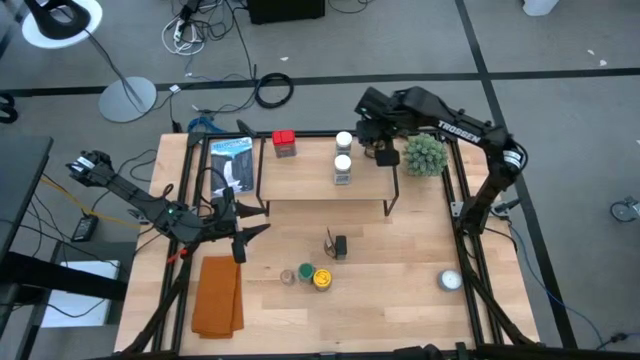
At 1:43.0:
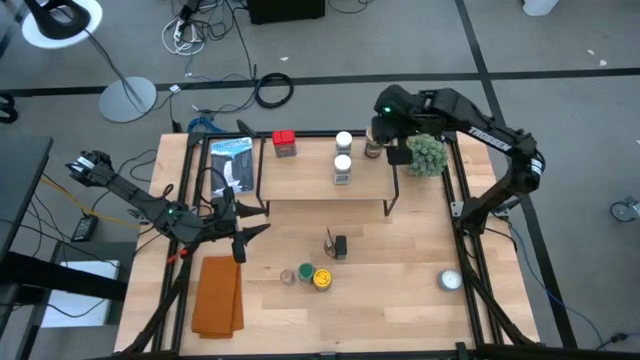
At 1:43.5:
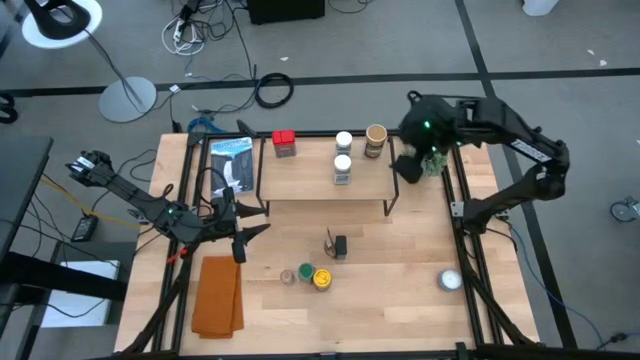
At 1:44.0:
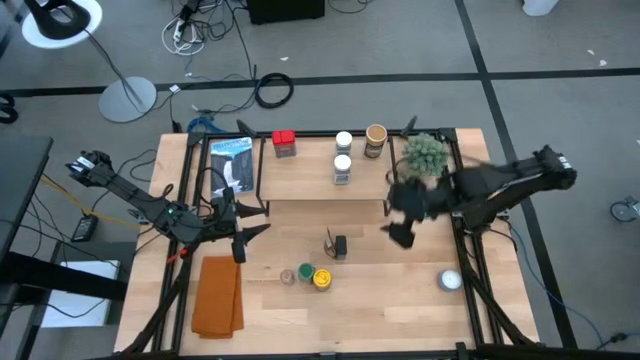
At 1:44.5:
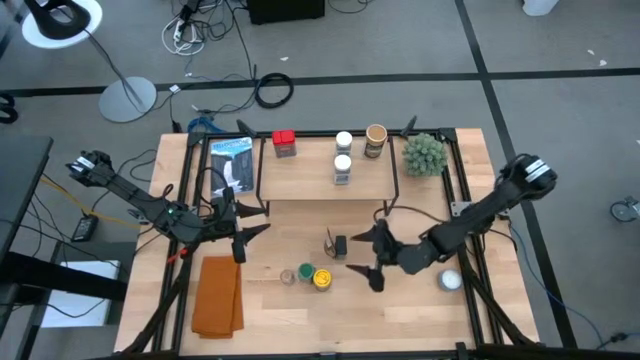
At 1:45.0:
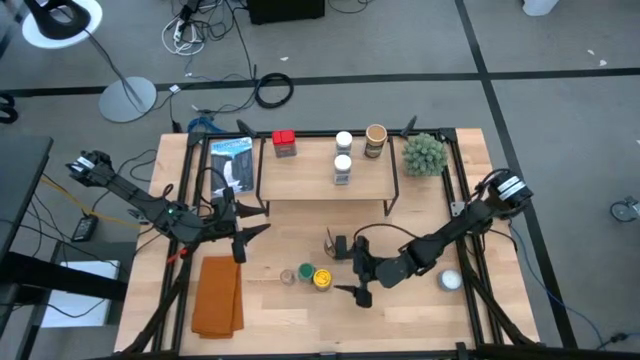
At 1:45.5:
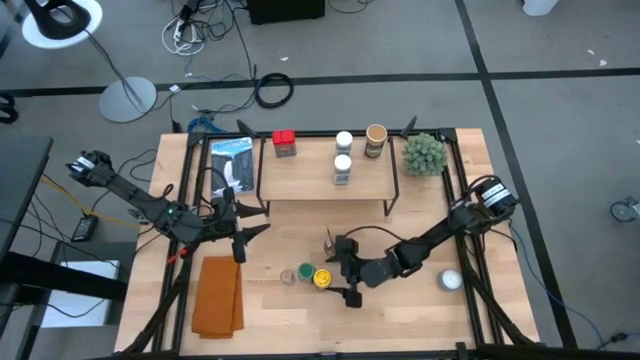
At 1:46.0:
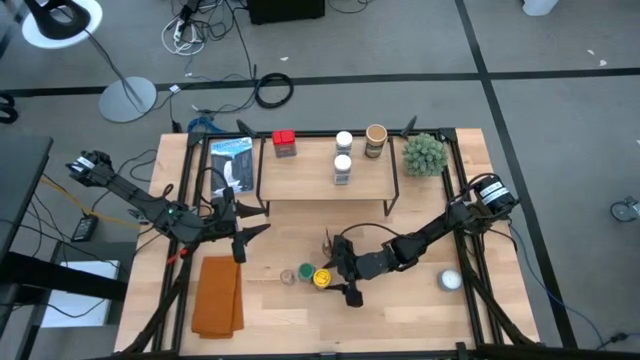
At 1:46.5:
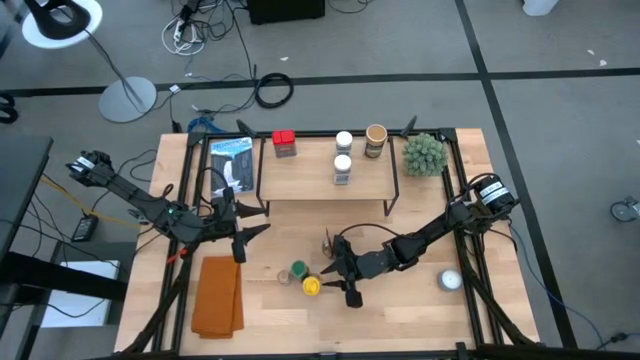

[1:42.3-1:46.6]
Task: Shelf spices
Put the yellow seasoning bottle on the shelf

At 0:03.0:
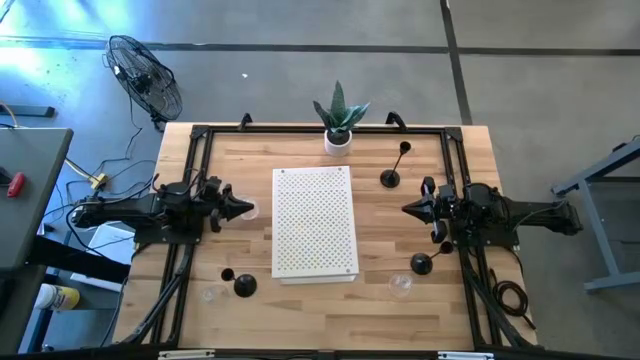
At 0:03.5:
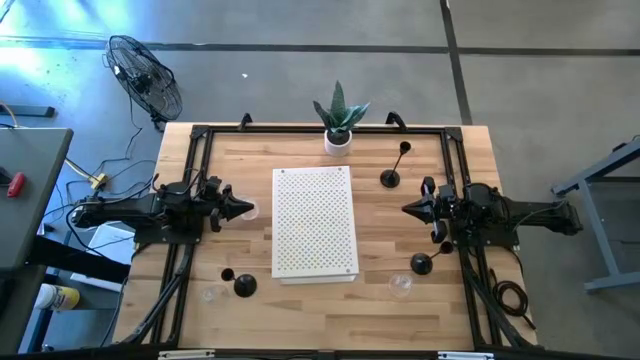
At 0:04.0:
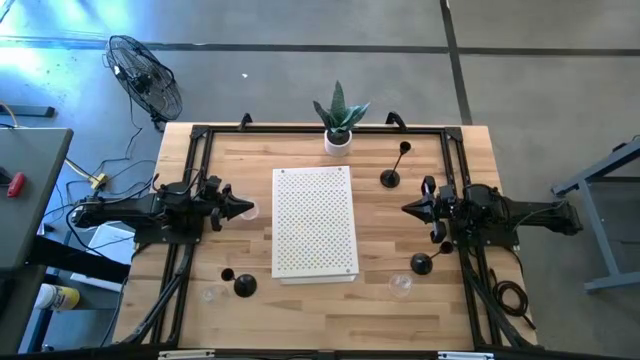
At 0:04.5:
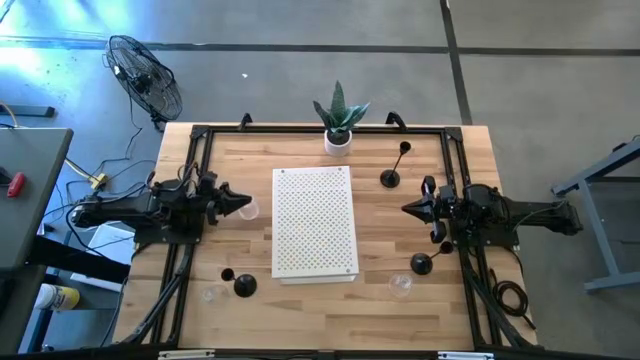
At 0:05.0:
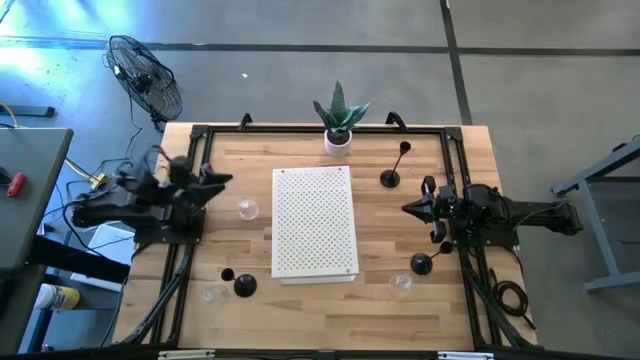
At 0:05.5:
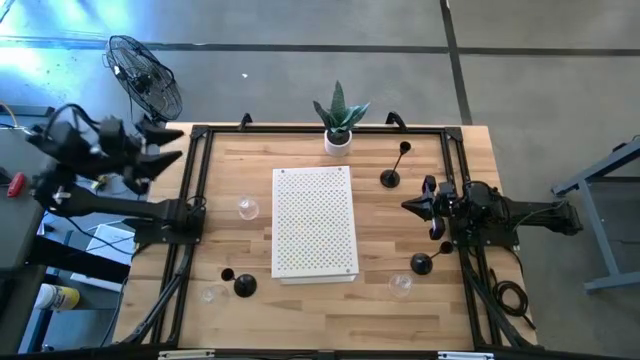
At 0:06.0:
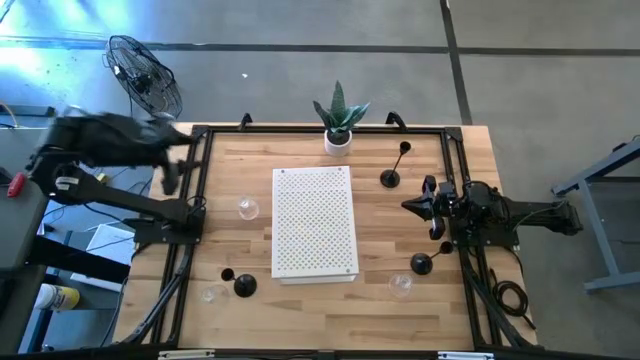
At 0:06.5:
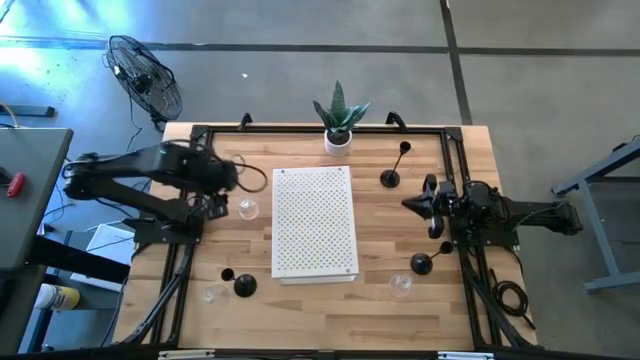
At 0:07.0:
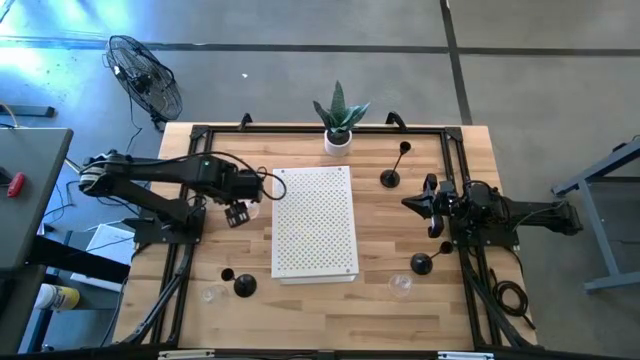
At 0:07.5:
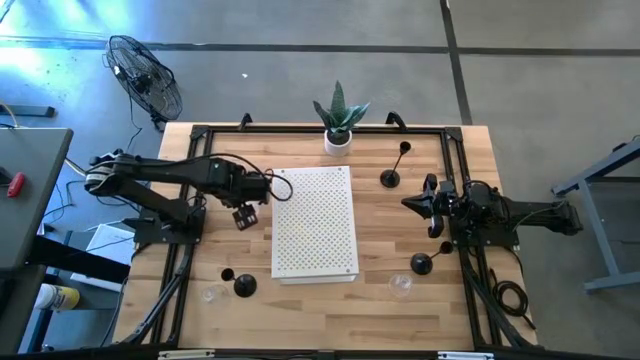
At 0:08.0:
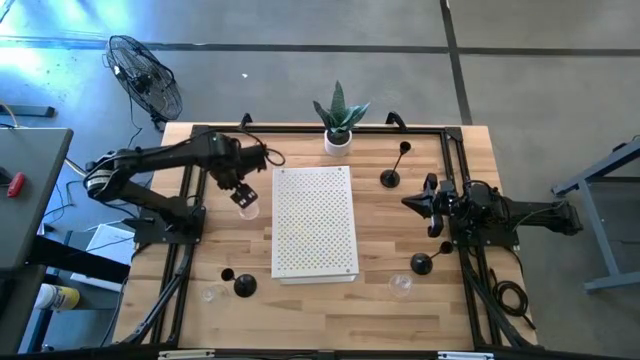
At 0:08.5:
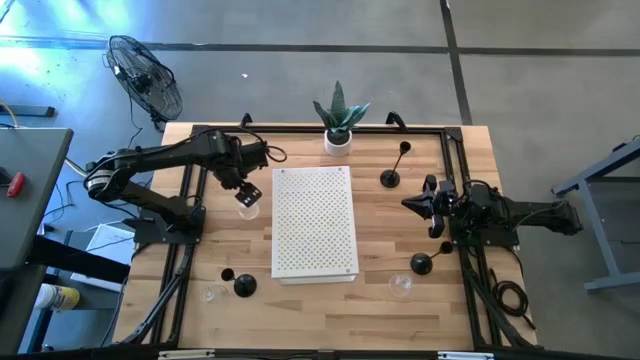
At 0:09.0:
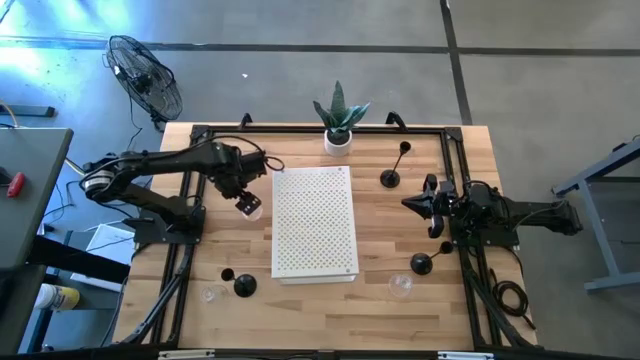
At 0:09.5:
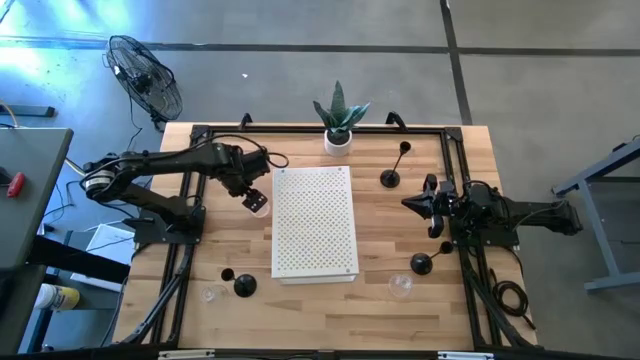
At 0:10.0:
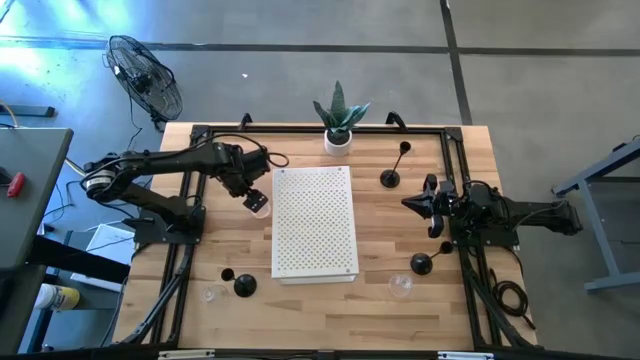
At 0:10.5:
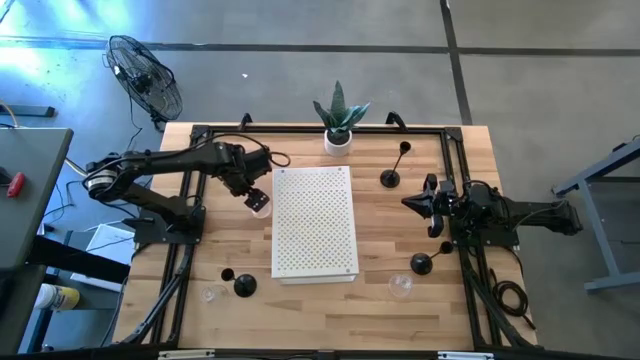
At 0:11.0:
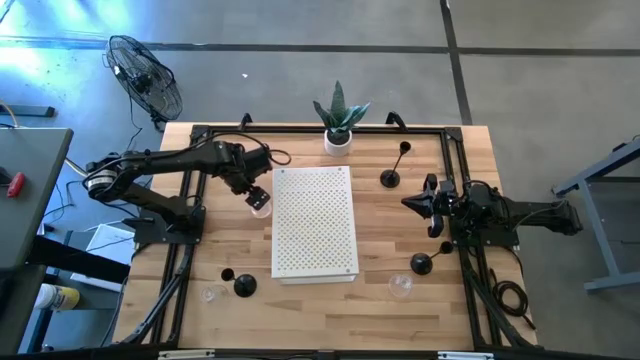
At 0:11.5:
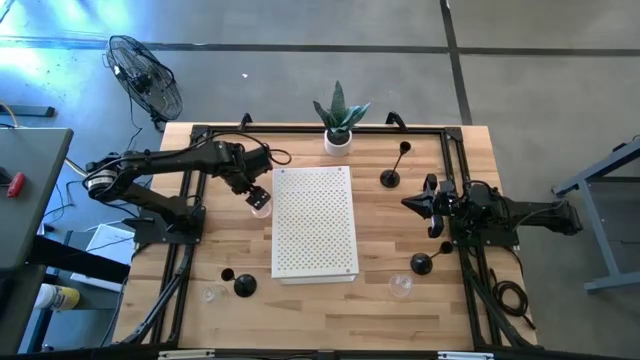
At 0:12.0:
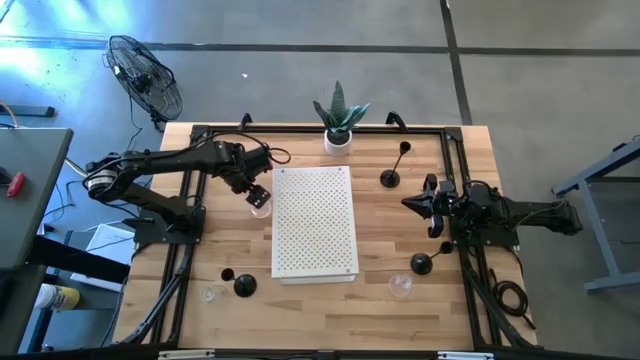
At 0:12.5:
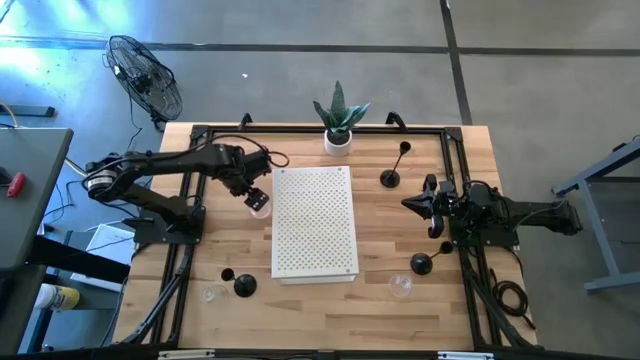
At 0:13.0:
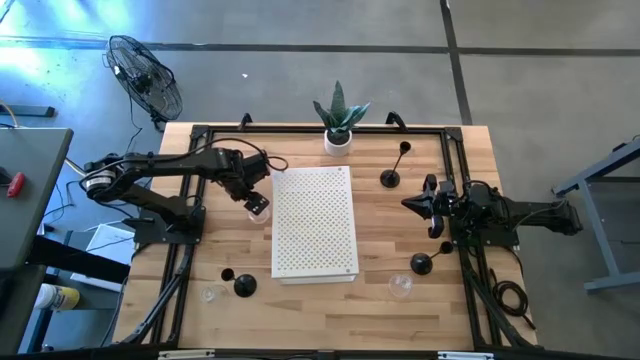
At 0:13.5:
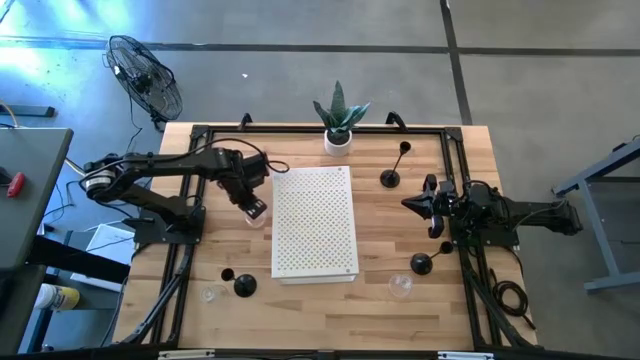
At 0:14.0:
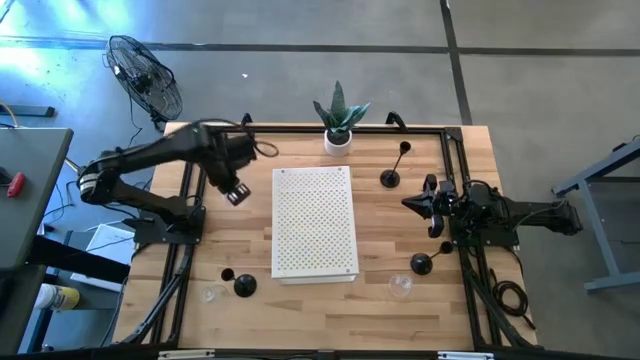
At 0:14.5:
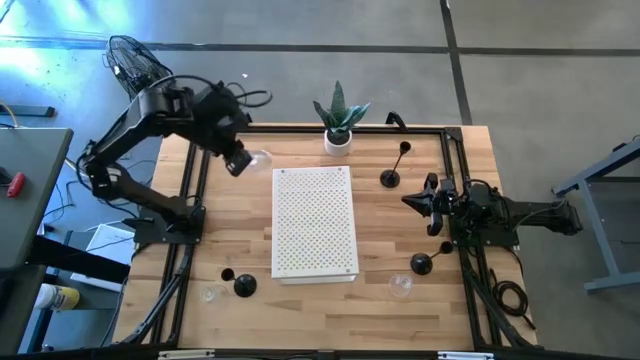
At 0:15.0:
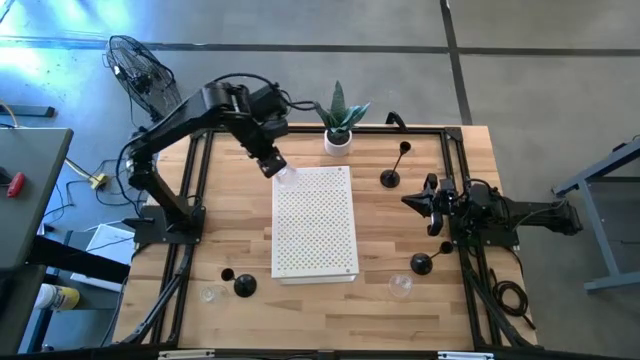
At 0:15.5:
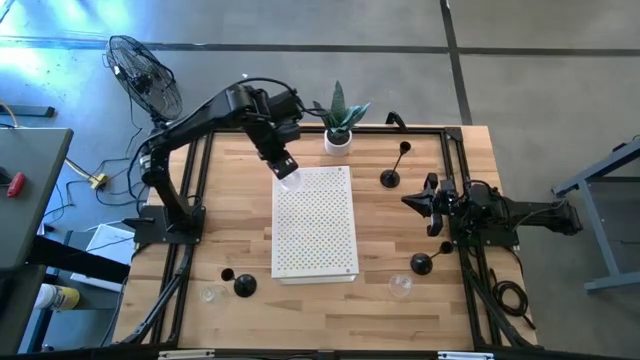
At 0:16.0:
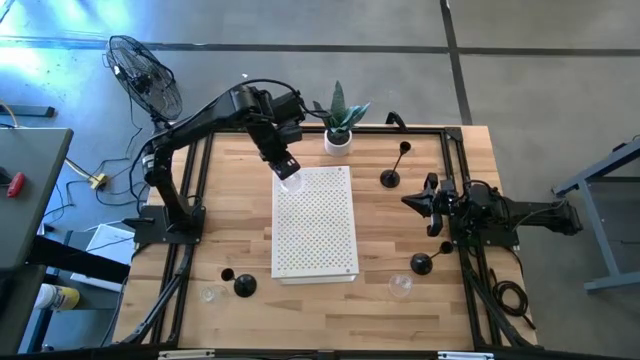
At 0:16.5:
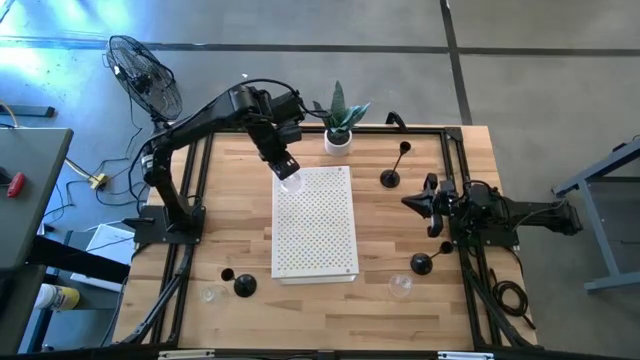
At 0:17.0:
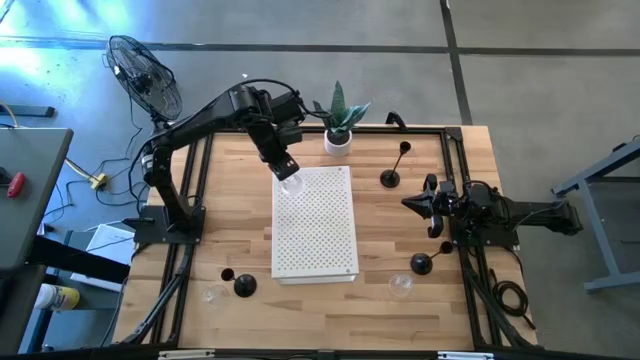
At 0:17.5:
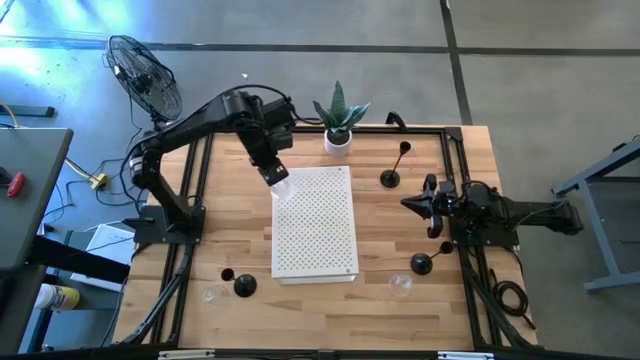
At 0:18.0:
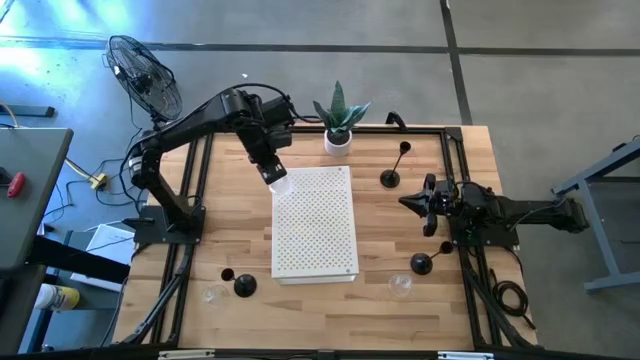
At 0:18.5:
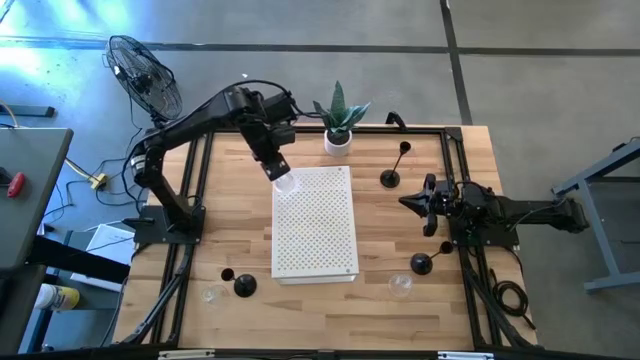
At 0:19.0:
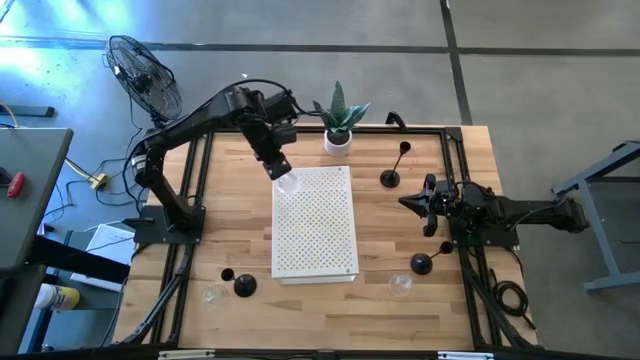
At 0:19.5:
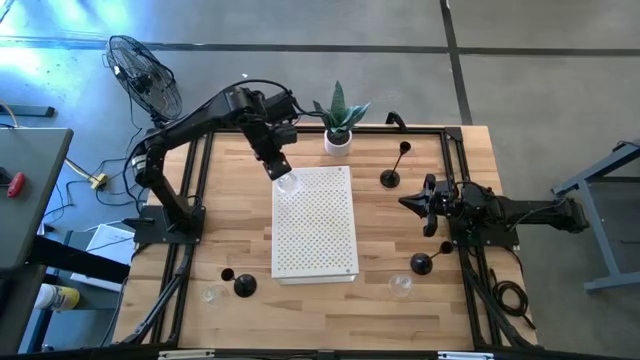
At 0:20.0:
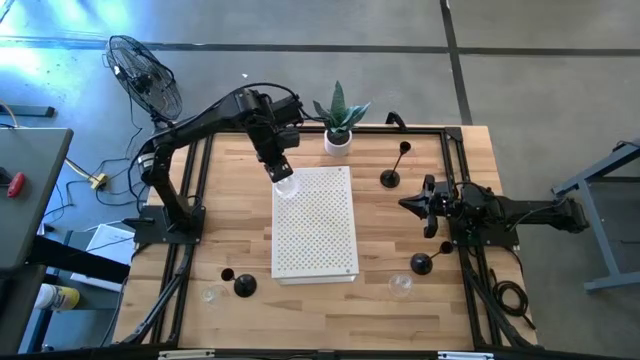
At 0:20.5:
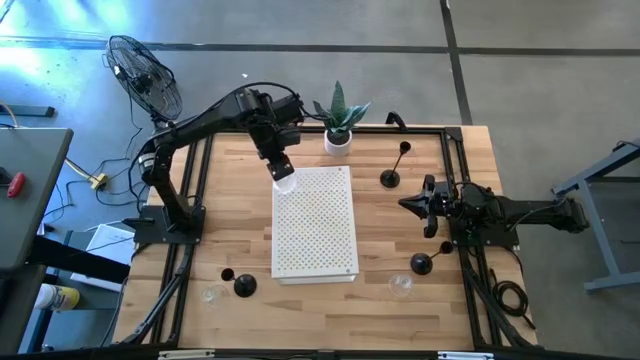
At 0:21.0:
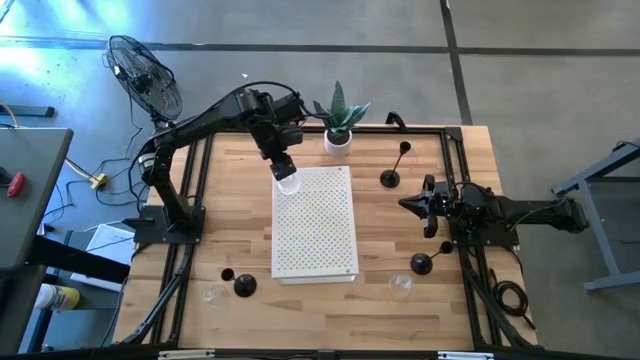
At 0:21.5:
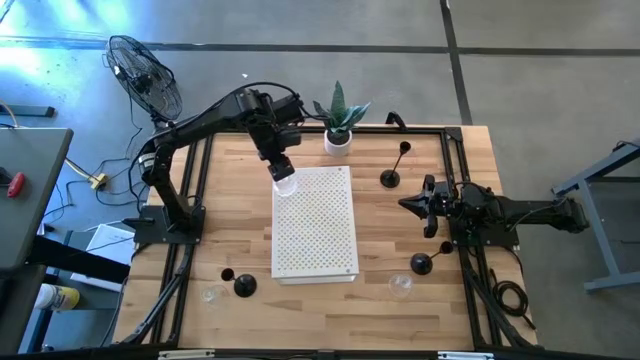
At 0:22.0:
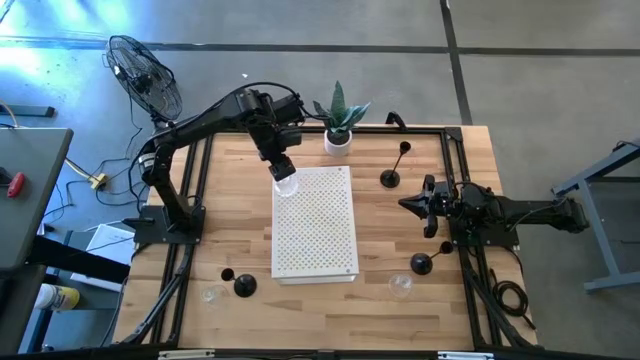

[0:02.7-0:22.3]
Task: Pick & Place candle stick holders
Put the top transparent glass candle holder on the shelf
